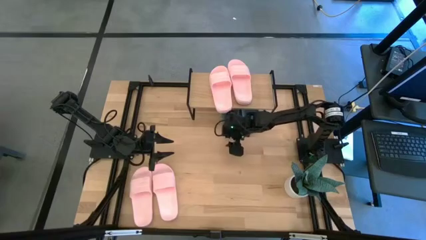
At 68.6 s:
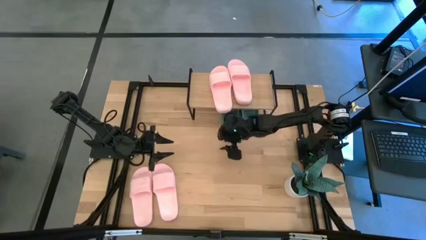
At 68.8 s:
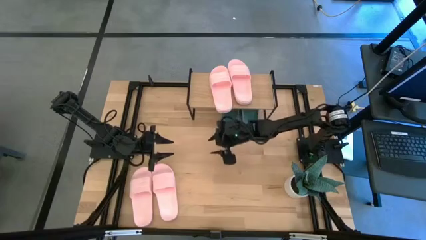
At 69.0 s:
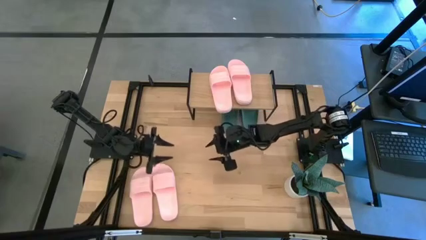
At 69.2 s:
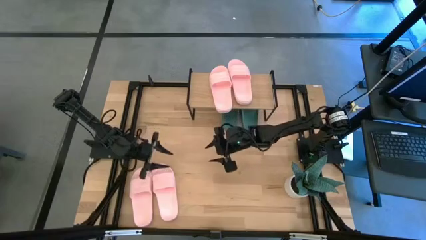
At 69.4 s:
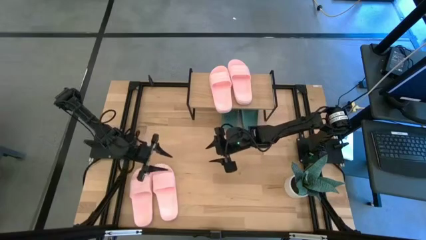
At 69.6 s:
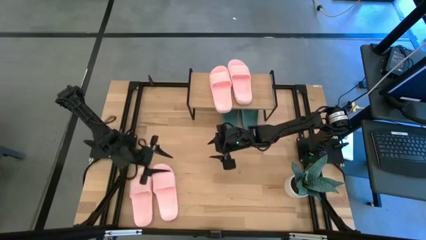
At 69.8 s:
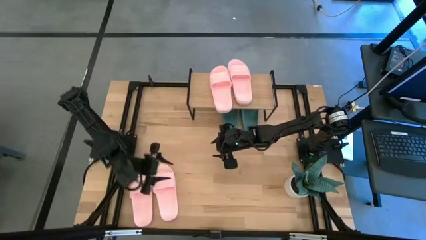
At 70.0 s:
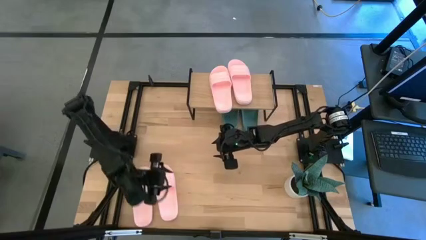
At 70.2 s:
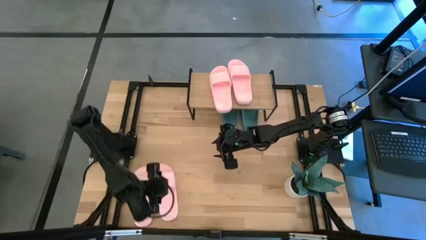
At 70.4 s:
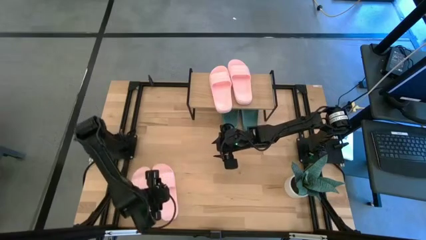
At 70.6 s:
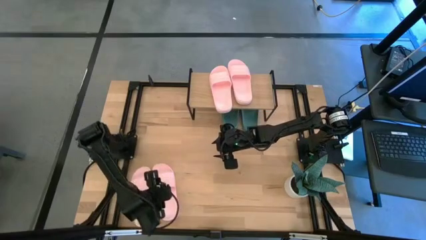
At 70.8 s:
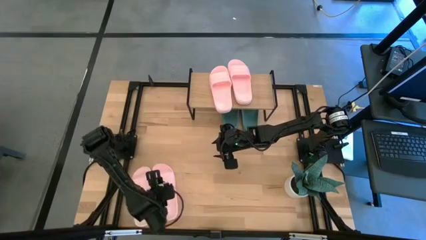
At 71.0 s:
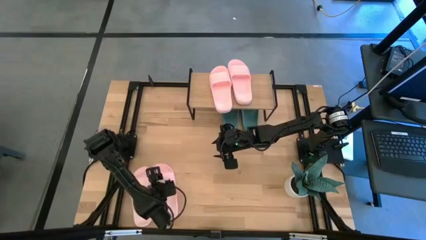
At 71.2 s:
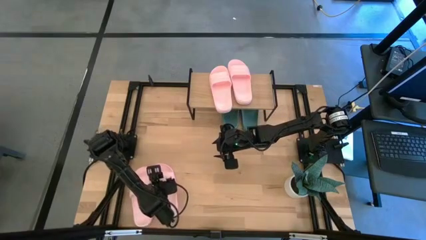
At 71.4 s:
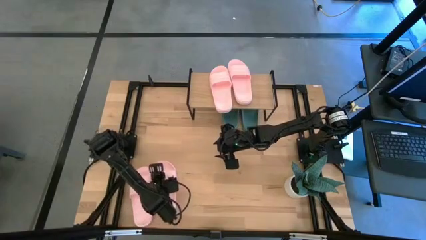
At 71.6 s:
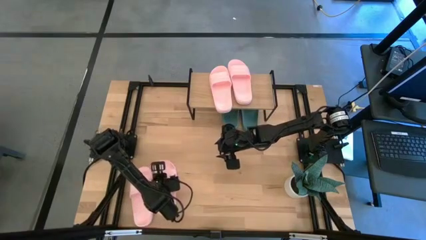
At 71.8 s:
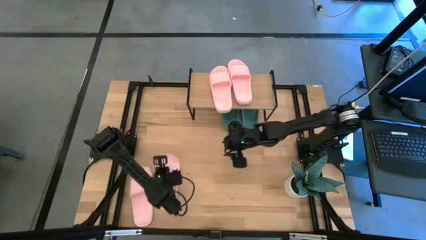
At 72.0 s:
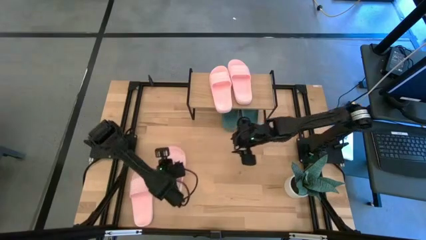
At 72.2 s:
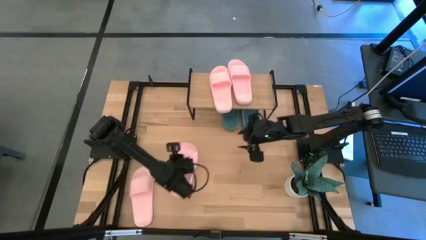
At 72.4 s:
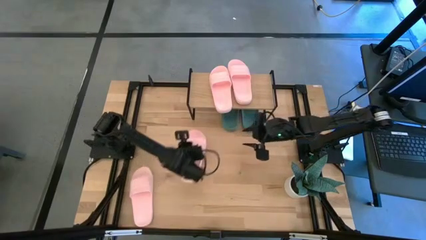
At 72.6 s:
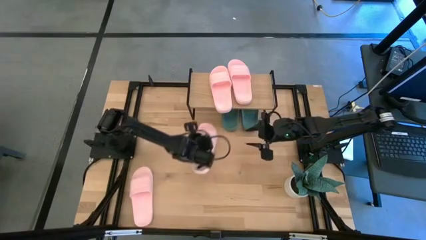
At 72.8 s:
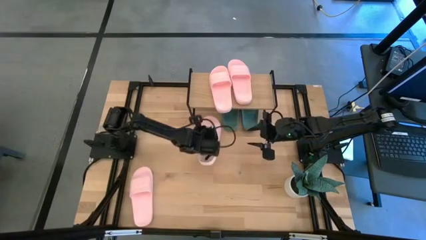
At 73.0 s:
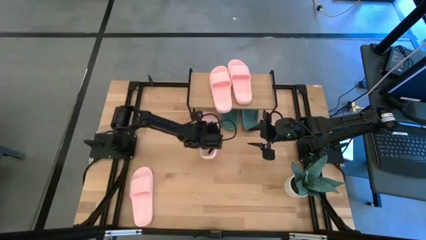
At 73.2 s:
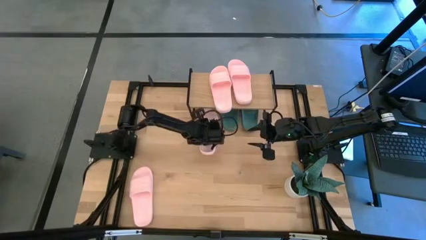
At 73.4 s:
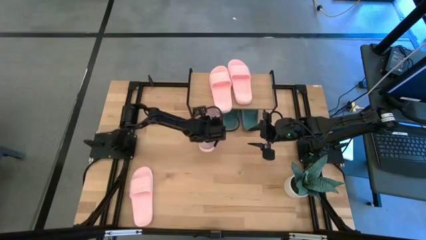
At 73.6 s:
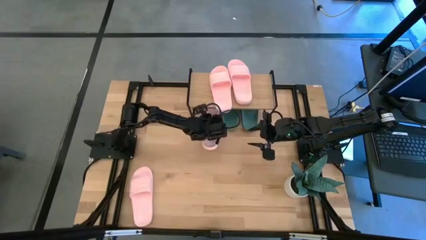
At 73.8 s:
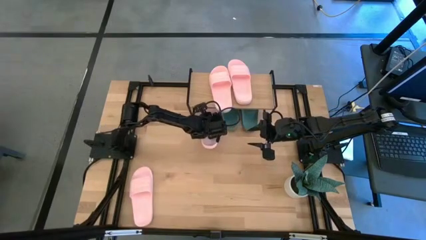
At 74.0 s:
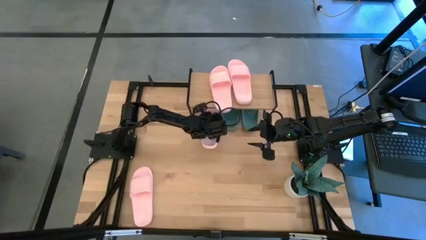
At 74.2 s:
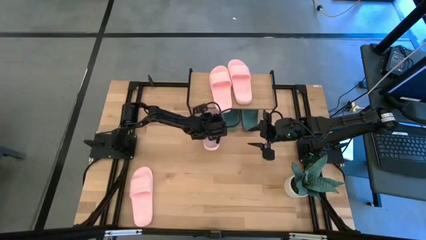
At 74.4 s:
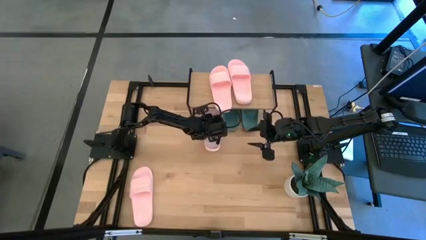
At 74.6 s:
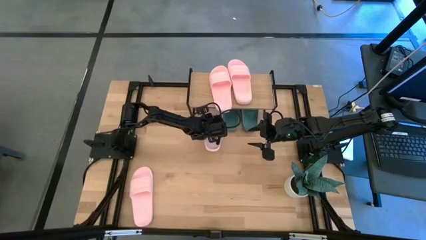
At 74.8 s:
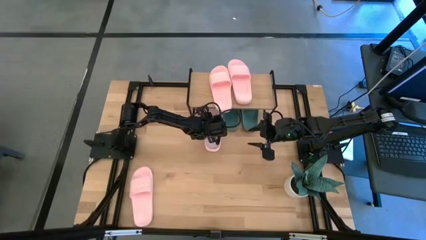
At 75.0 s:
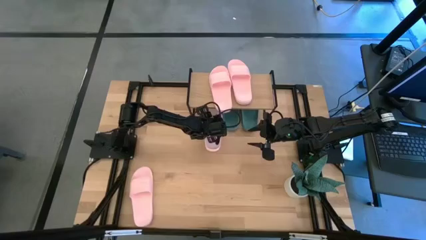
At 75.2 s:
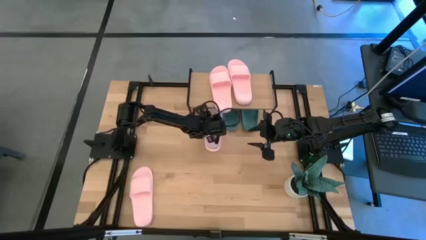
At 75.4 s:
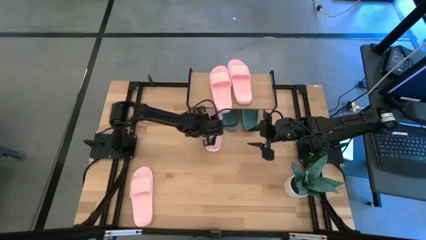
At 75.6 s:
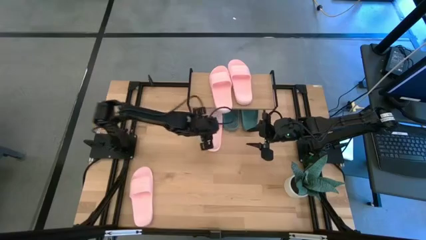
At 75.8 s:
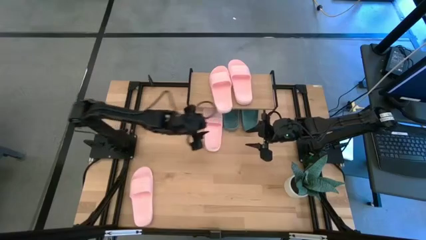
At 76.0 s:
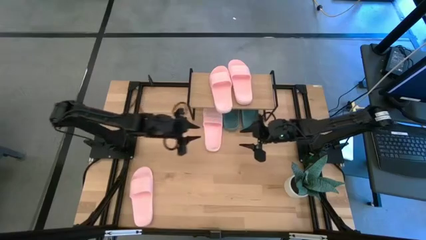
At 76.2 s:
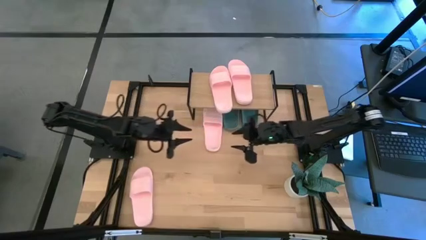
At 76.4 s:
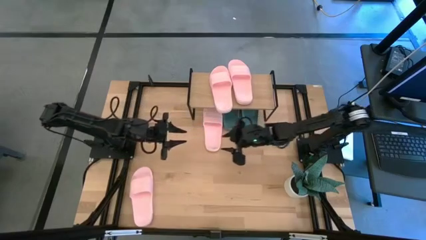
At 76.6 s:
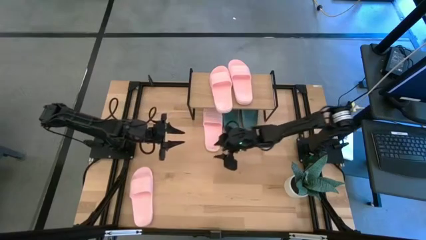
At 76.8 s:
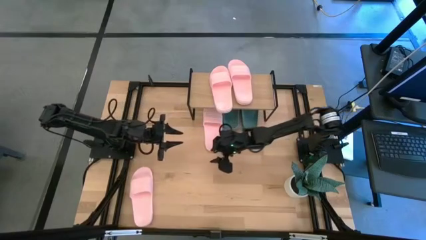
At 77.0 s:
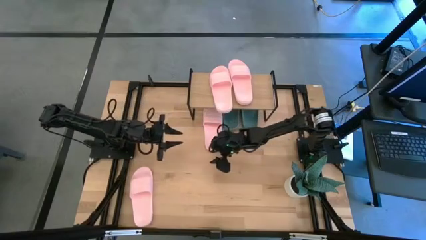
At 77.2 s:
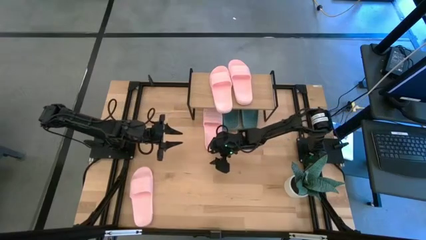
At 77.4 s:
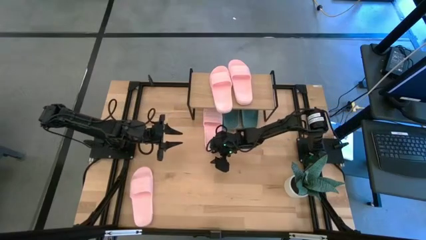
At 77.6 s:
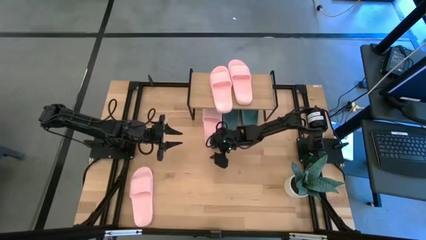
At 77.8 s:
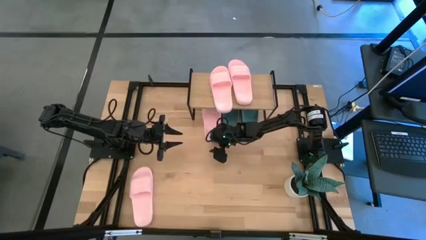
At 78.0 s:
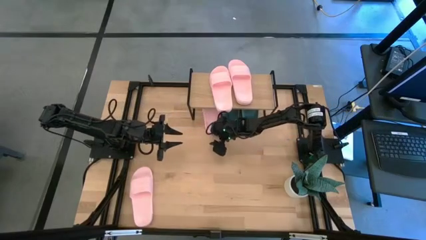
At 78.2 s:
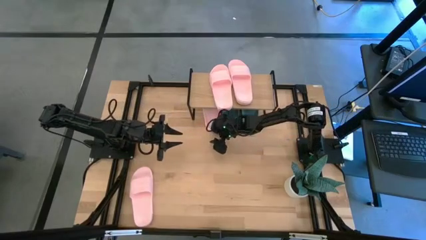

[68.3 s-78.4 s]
Task: Pick and place slides into the shelf
Put the pink slipper under the shelf

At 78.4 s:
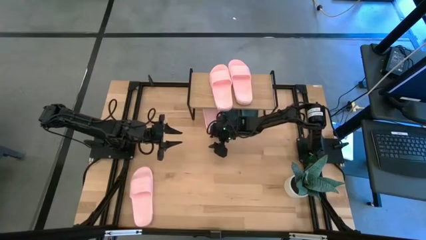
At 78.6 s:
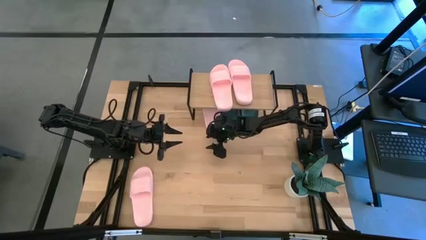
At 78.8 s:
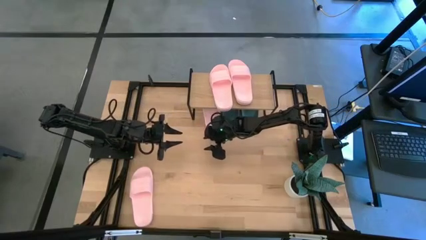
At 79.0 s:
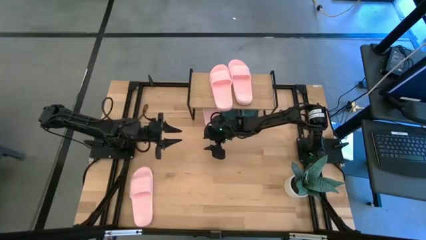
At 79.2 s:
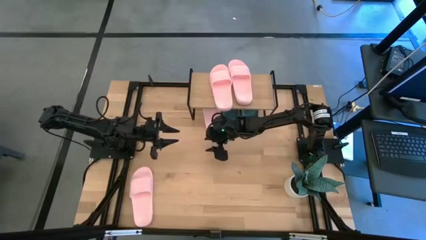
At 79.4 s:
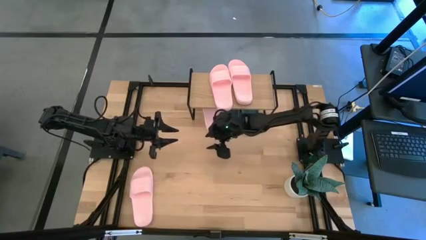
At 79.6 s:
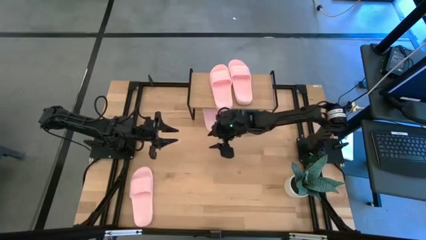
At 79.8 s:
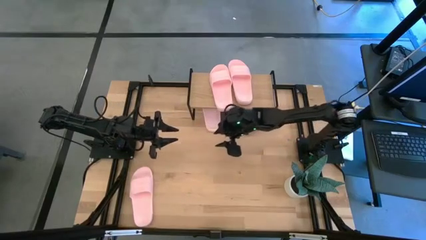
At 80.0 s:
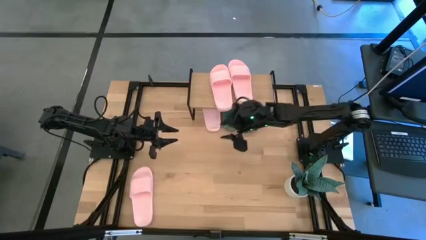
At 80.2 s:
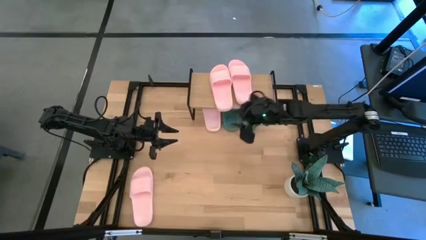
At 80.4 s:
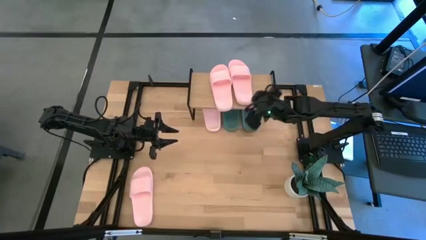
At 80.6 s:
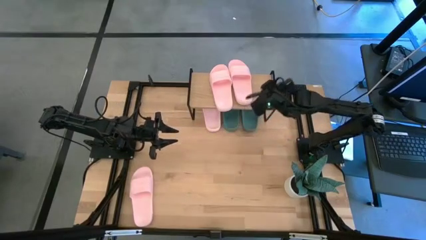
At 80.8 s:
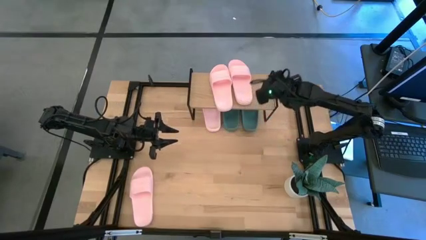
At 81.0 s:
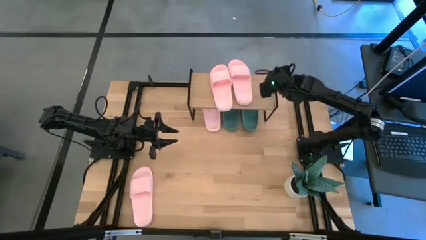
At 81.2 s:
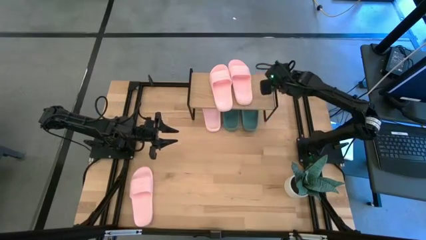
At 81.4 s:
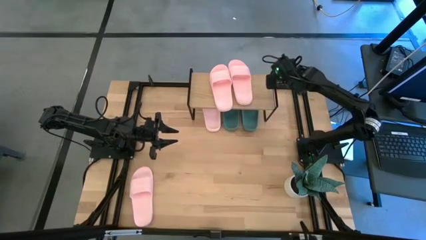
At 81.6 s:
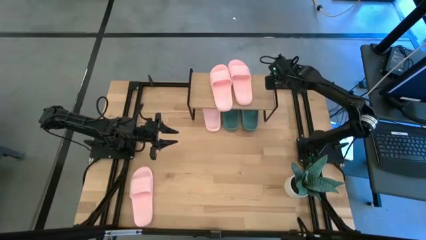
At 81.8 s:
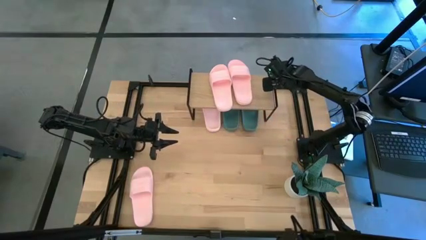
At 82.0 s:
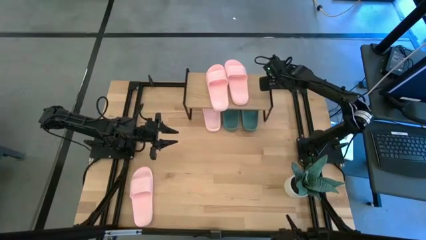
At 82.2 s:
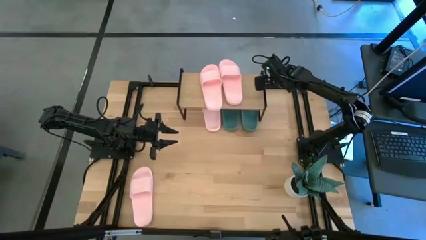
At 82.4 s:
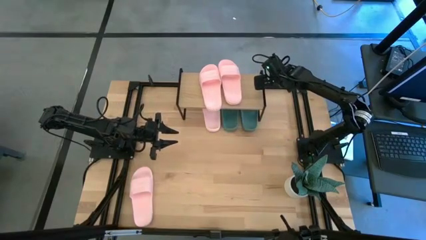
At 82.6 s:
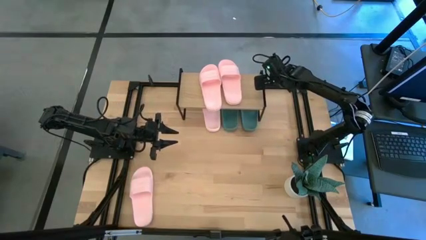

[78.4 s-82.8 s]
Adjust the shelf
